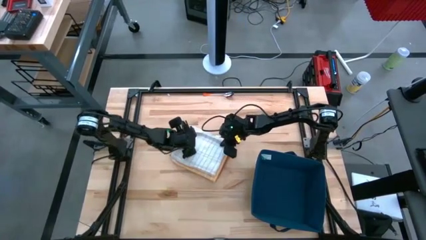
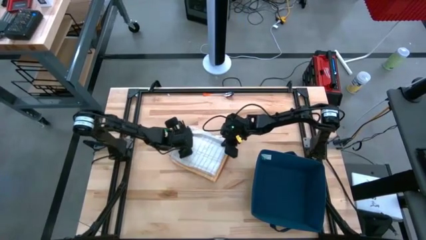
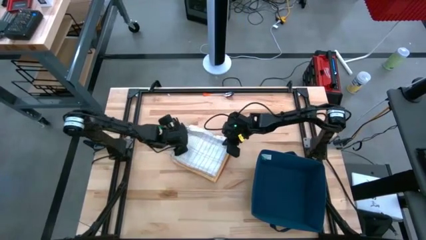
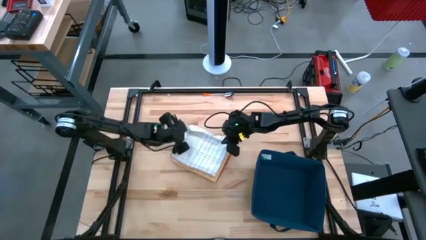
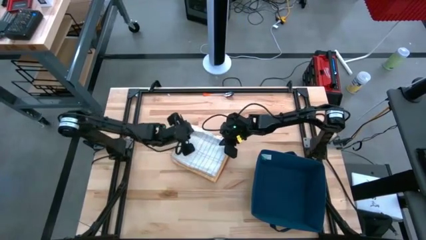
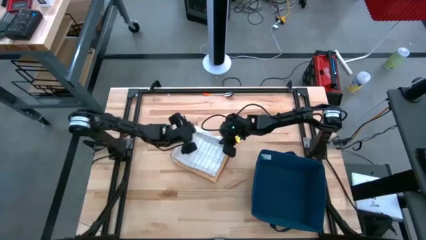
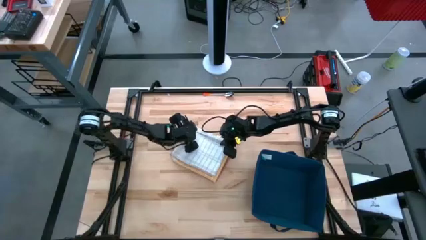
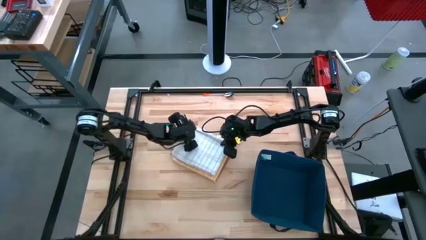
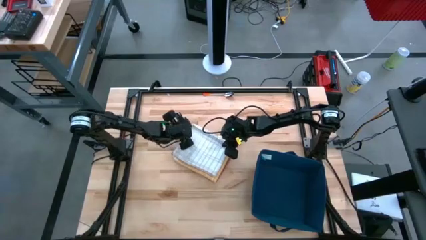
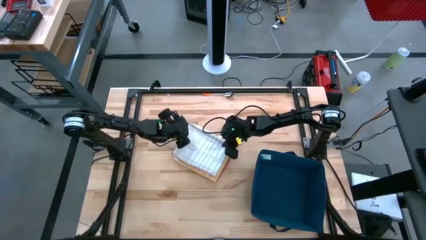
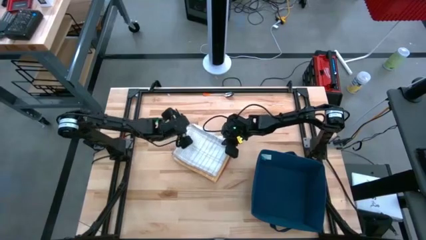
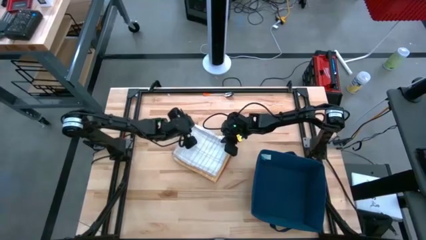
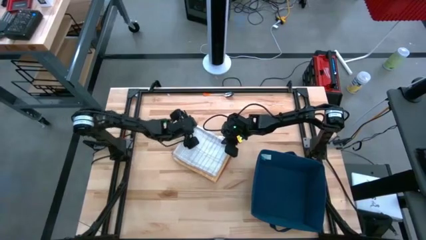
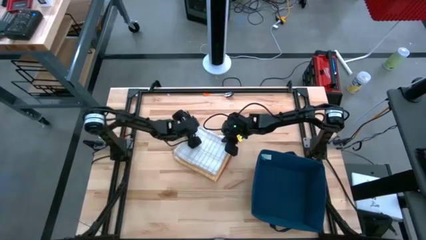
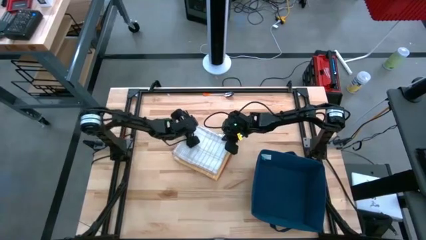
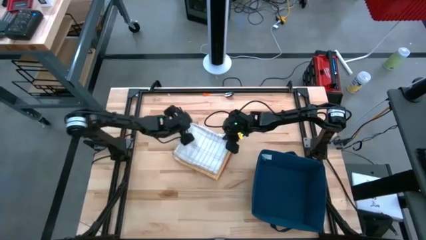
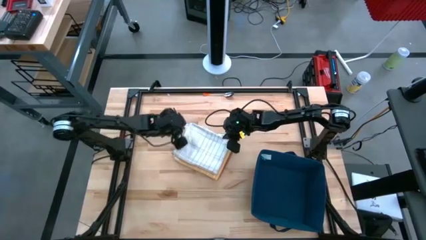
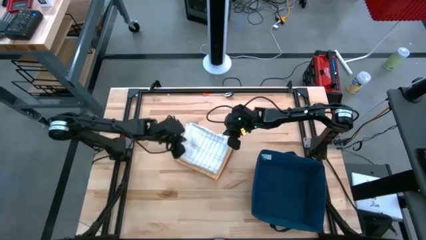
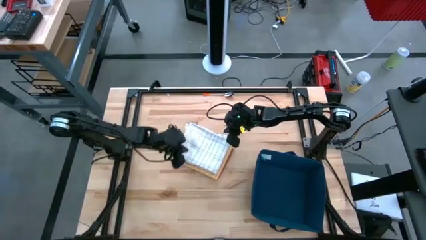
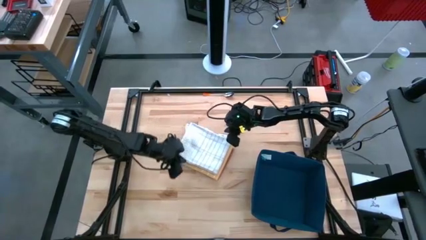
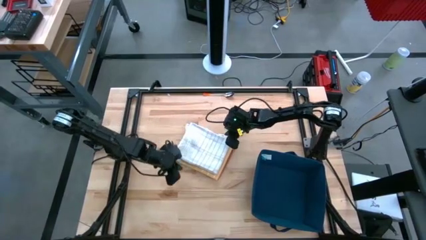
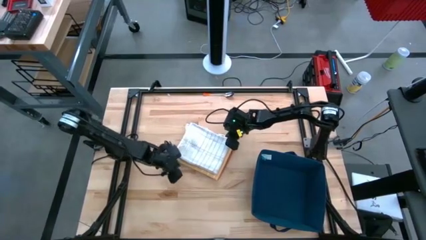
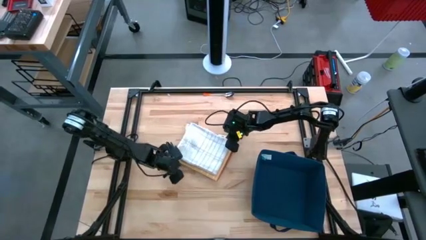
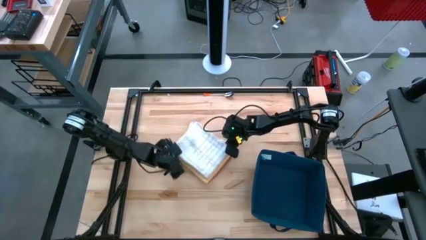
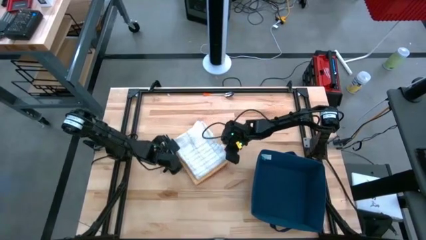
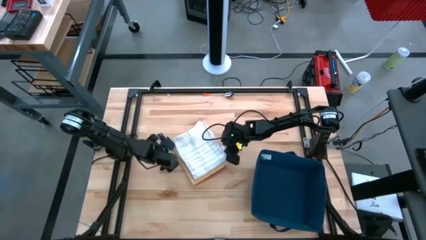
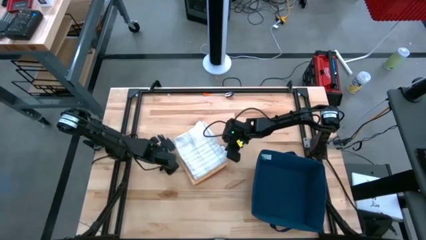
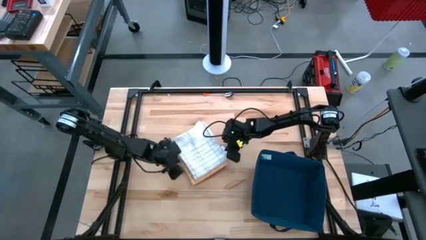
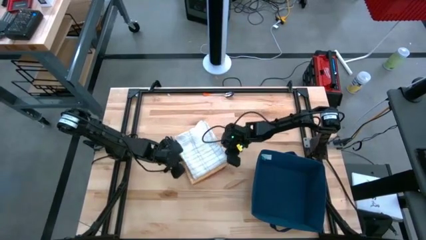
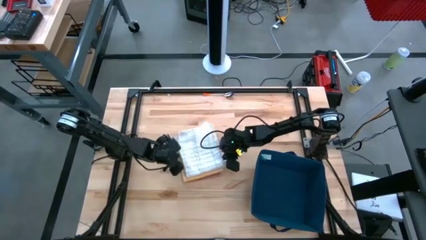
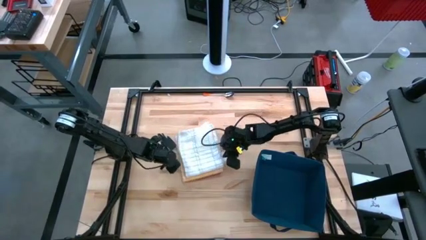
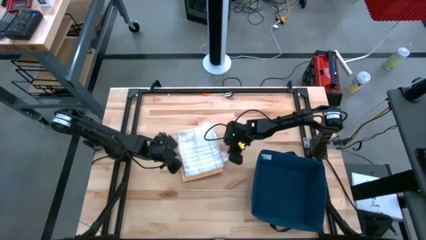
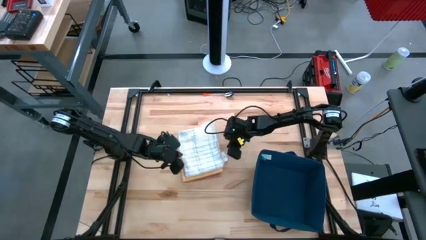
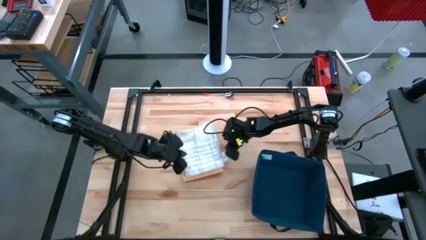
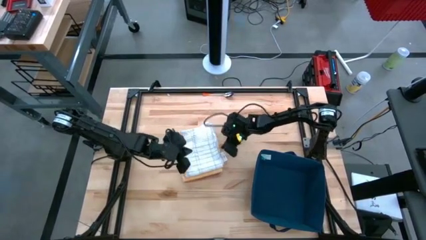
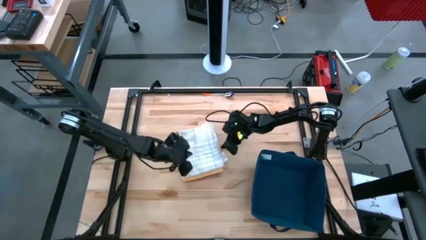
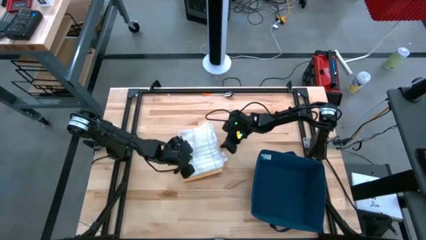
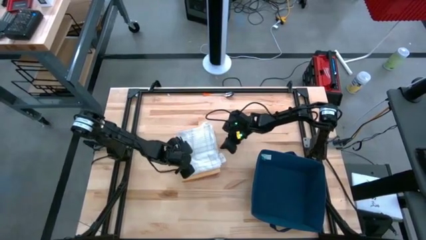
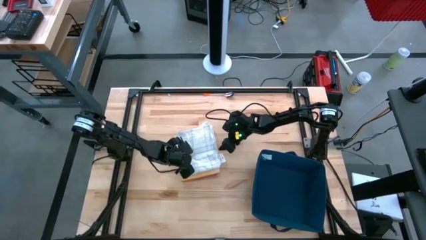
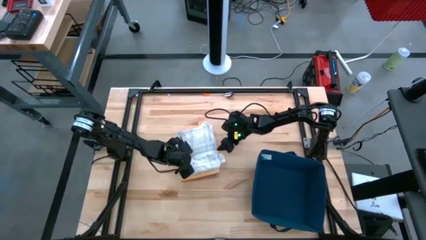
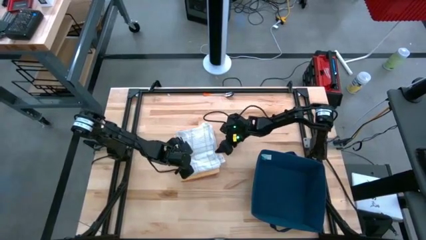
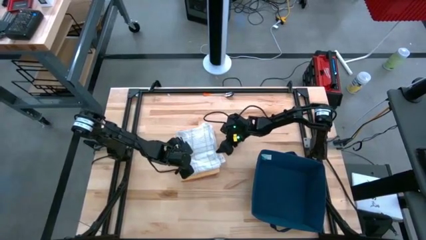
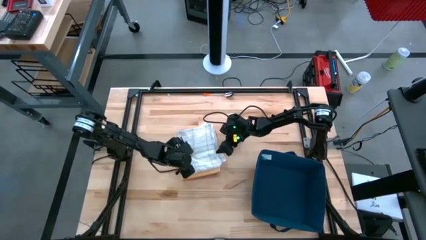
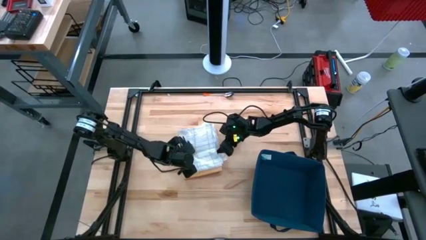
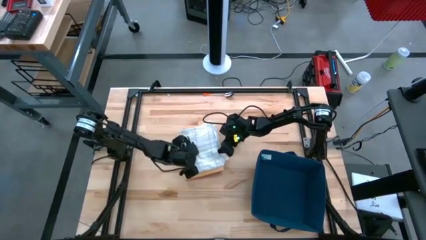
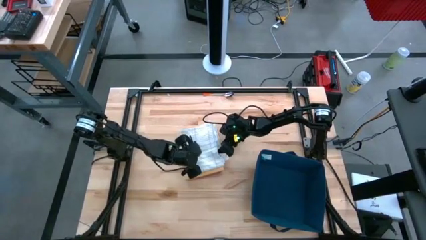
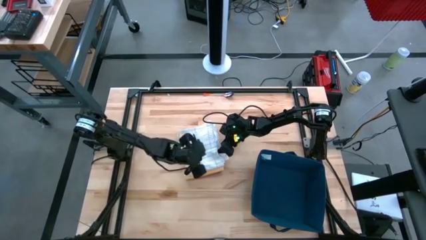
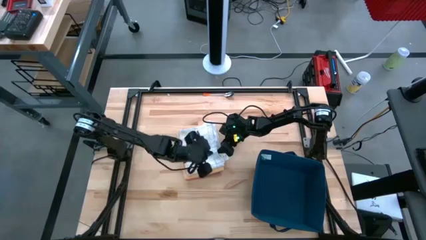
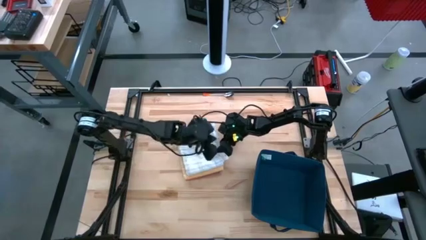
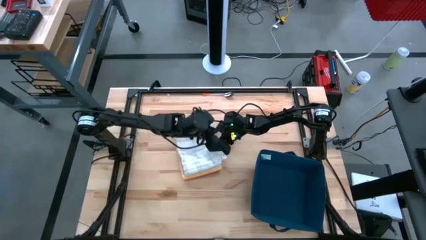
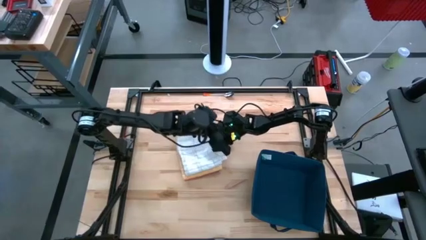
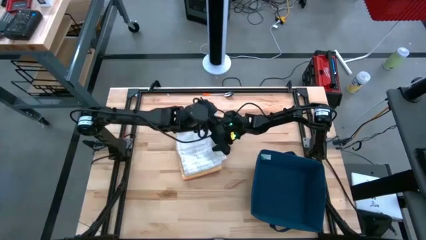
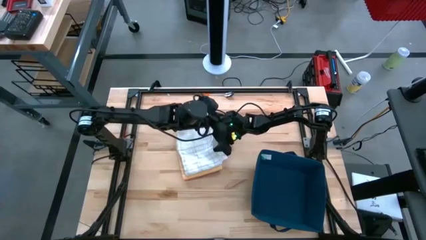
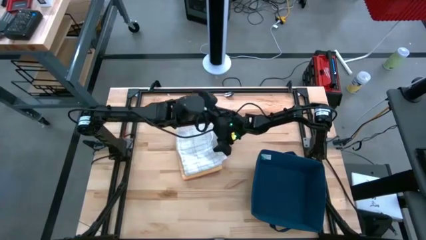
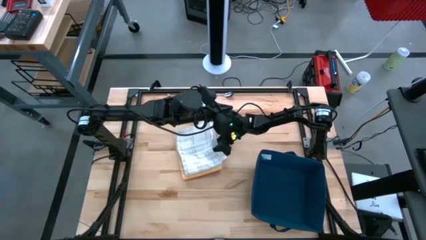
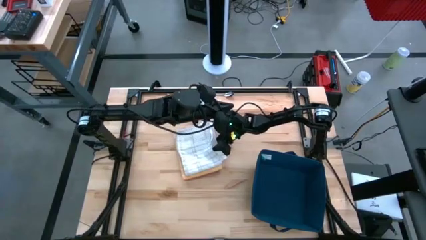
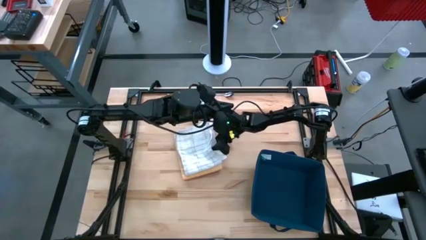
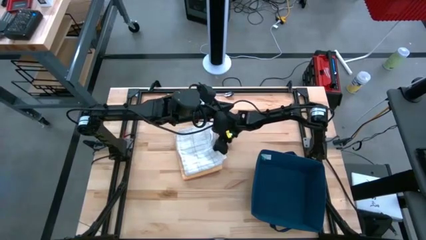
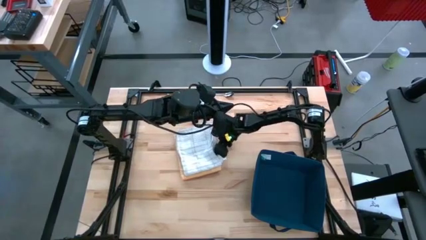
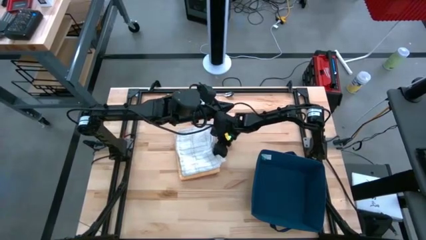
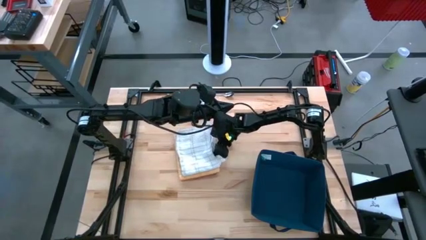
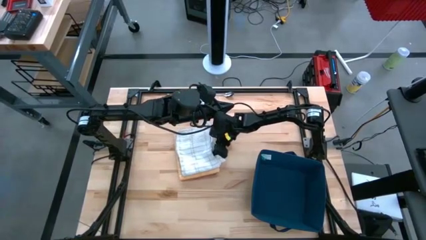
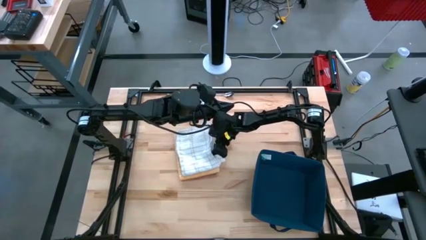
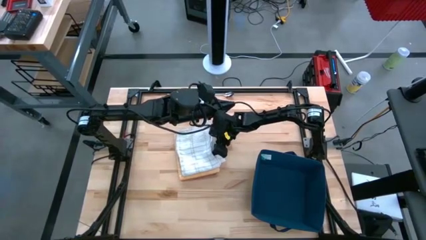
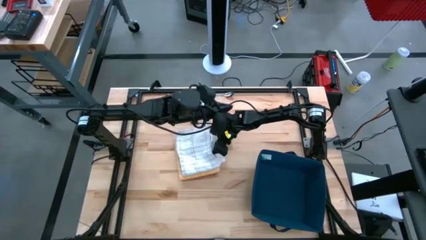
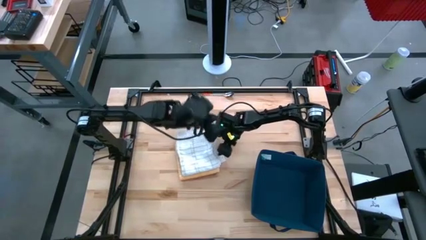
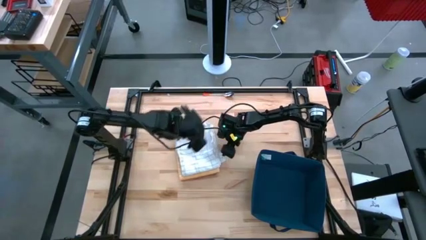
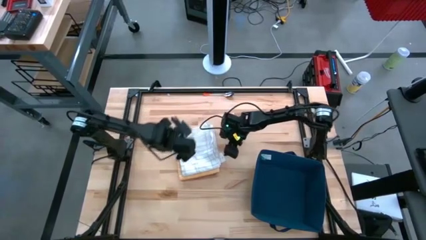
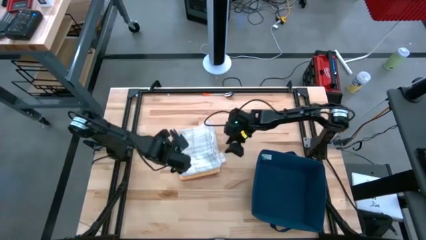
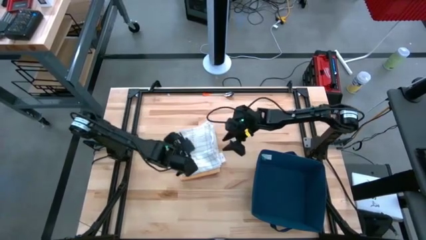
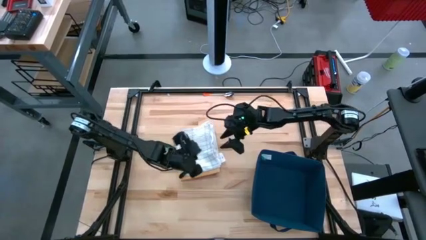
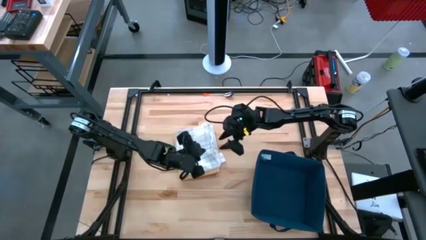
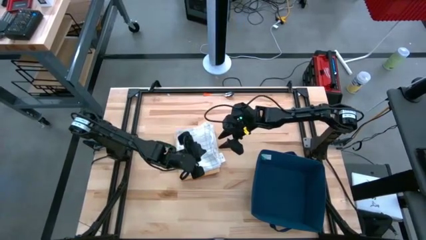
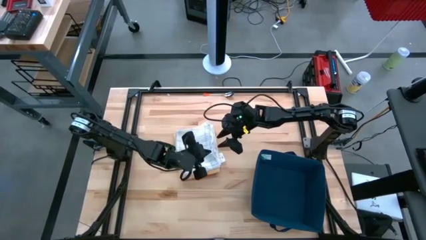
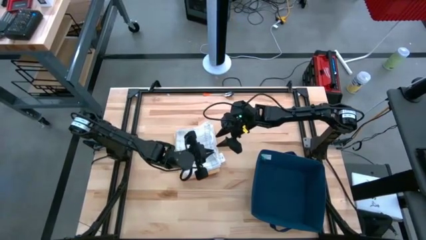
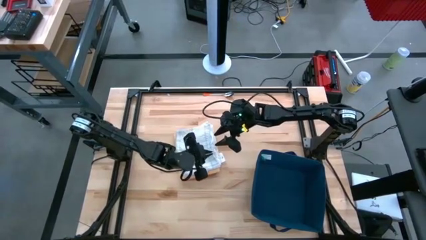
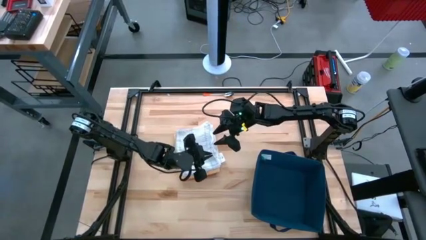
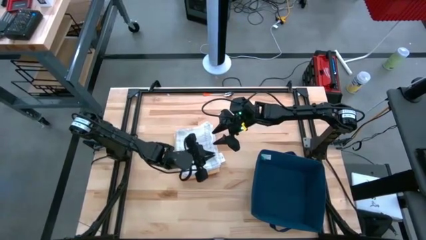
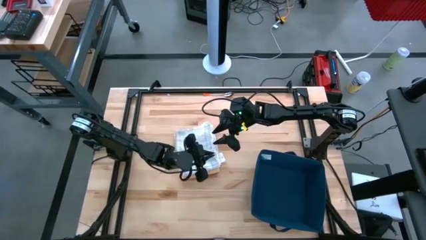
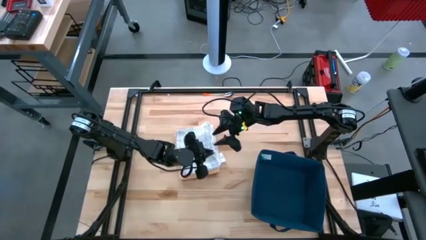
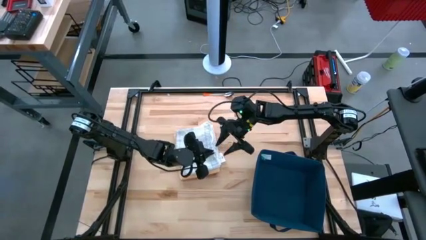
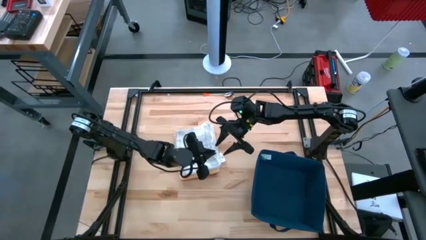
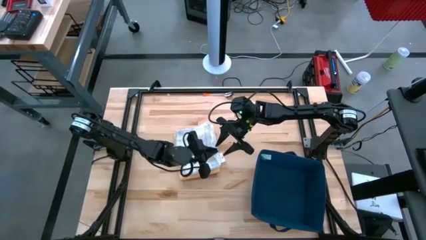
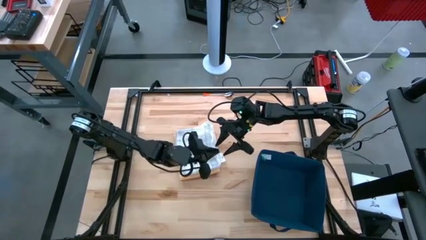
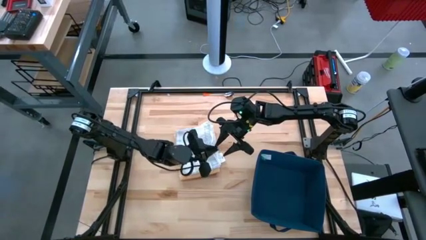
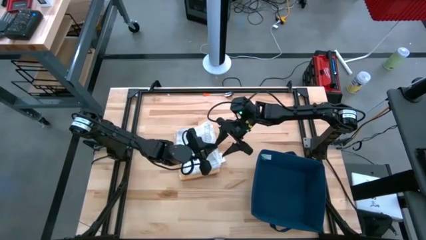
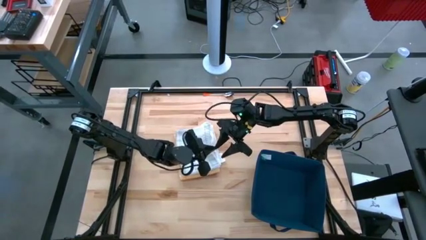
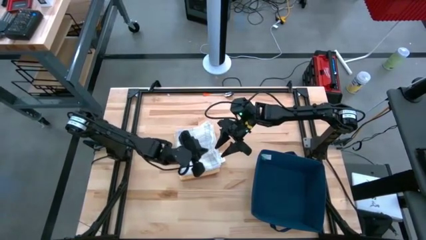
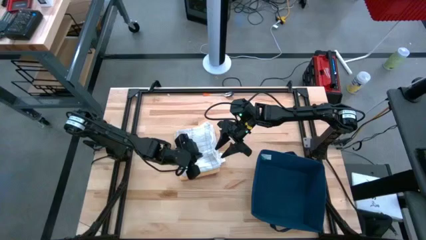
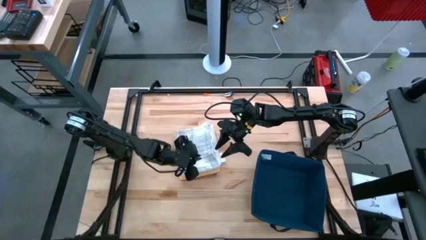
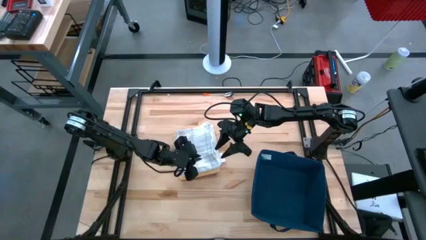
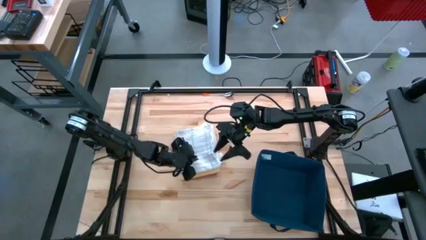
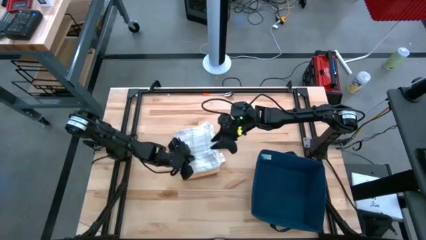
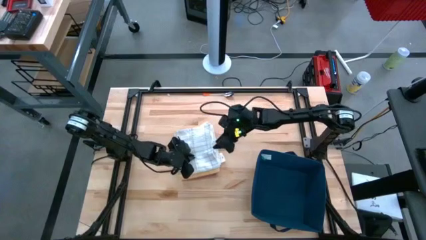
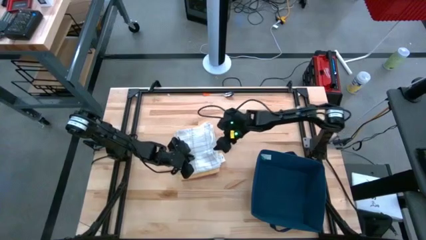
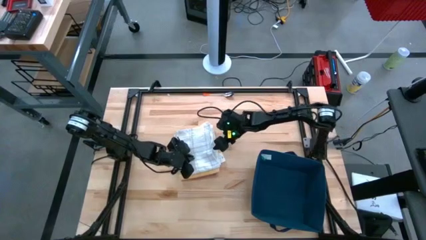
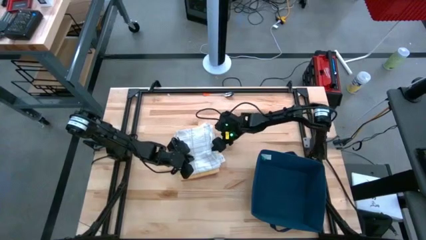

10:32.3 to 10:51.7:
Task: Fold towel
Stack the folded white towel on top of the folded yellow towel
